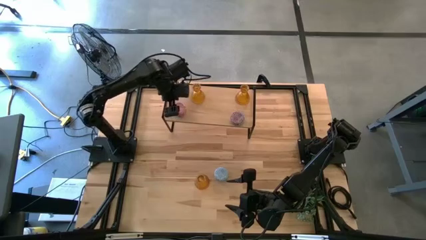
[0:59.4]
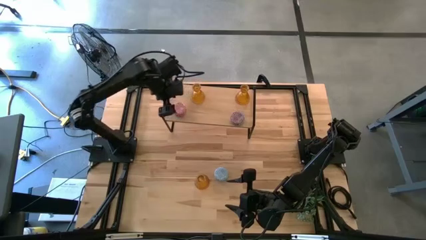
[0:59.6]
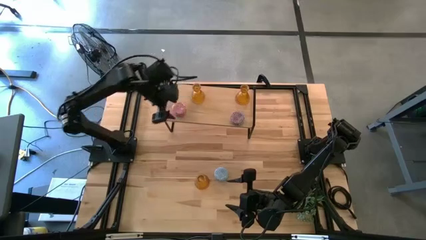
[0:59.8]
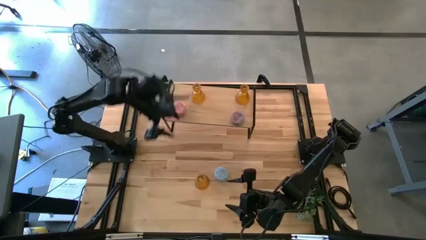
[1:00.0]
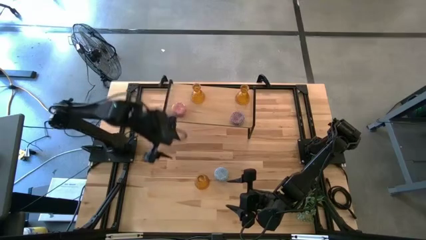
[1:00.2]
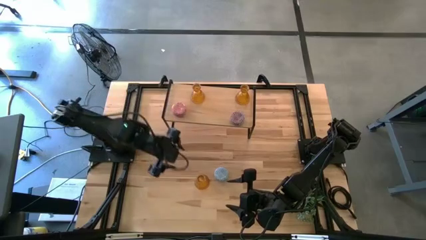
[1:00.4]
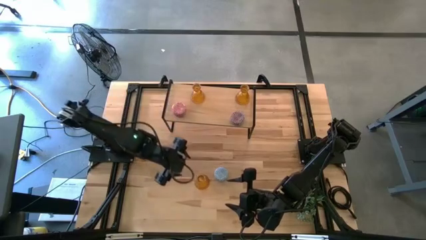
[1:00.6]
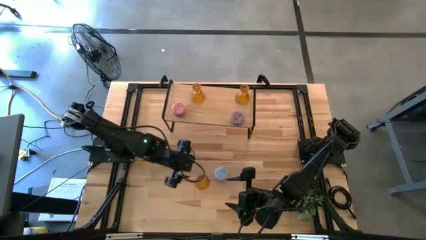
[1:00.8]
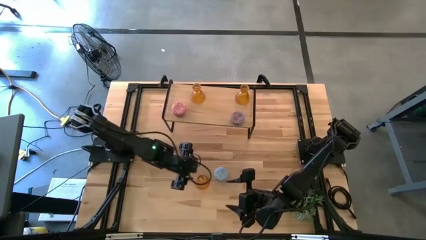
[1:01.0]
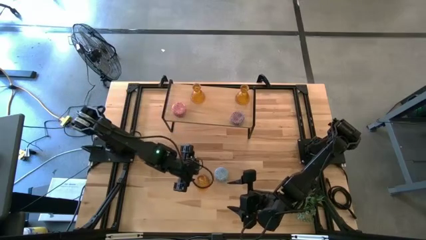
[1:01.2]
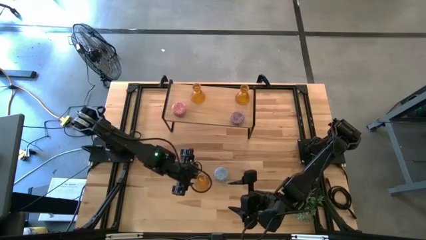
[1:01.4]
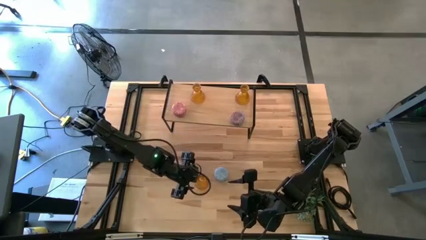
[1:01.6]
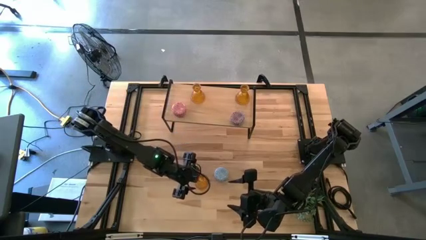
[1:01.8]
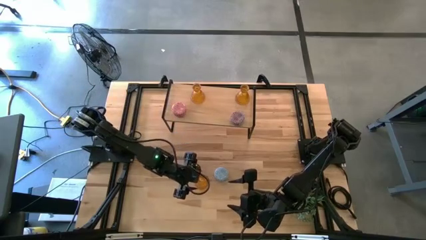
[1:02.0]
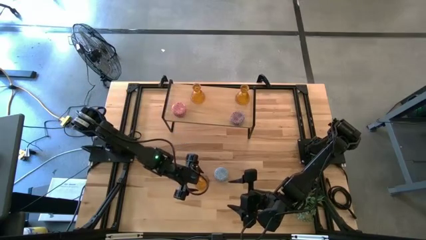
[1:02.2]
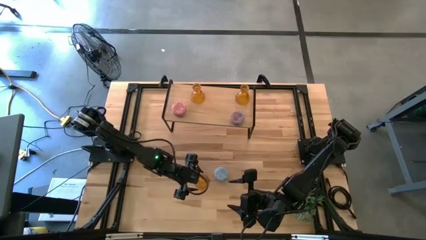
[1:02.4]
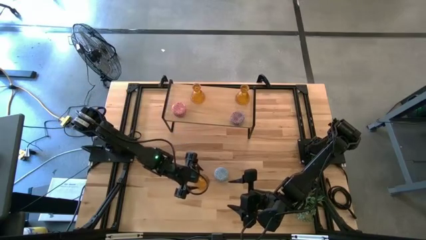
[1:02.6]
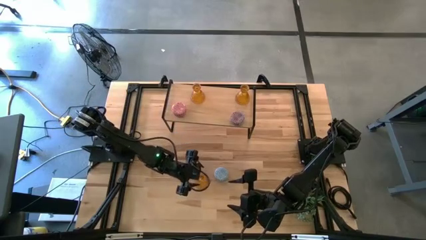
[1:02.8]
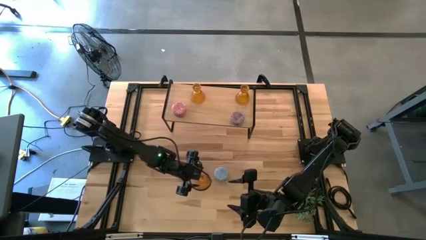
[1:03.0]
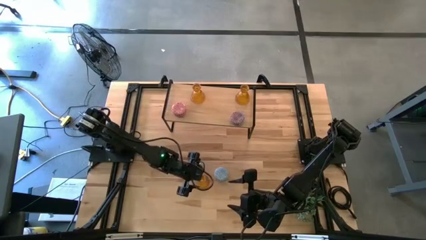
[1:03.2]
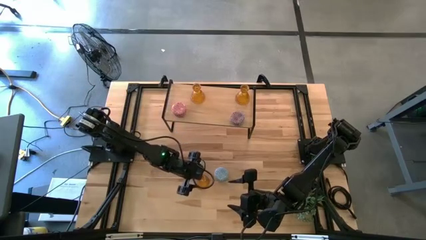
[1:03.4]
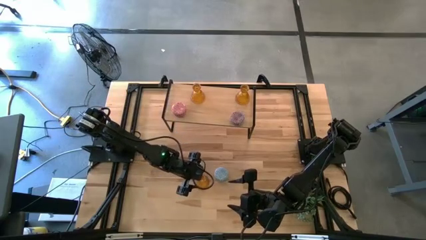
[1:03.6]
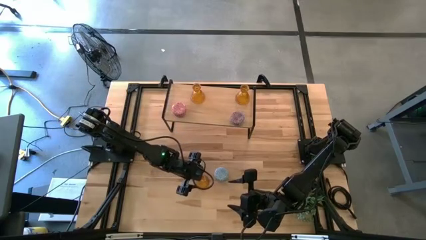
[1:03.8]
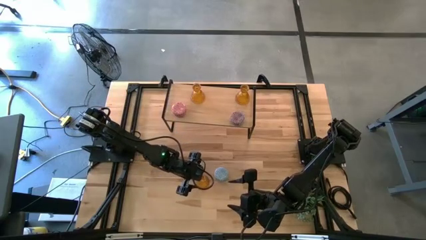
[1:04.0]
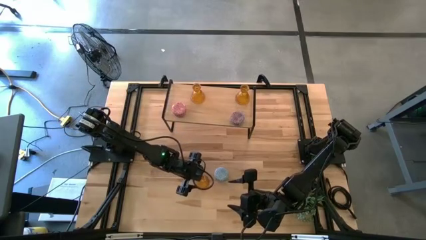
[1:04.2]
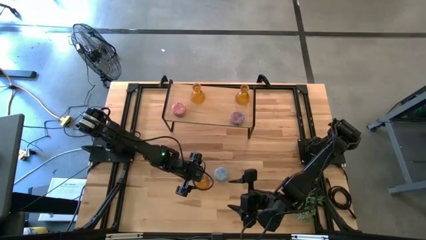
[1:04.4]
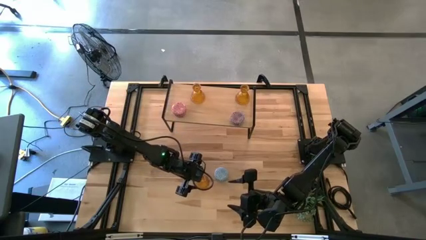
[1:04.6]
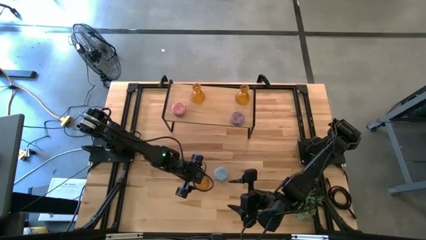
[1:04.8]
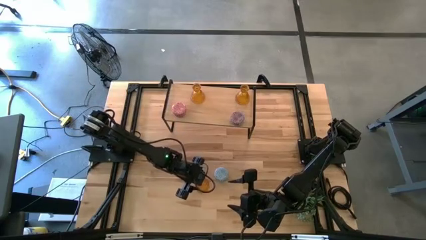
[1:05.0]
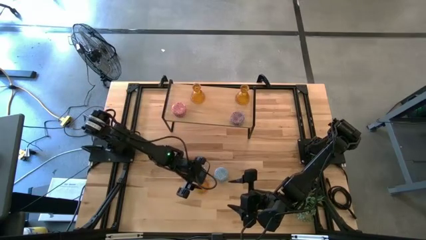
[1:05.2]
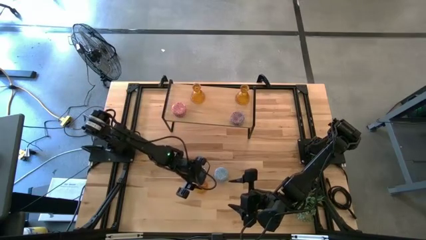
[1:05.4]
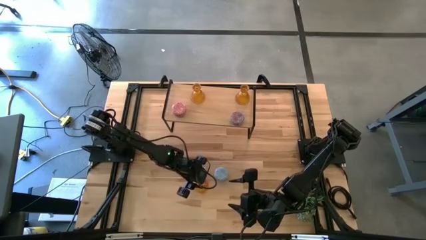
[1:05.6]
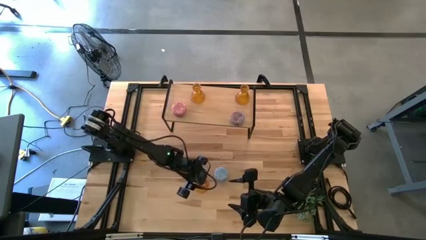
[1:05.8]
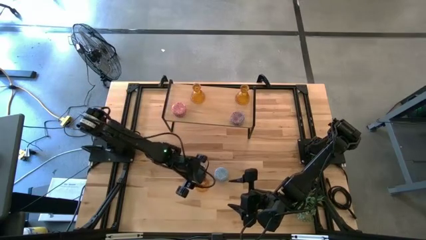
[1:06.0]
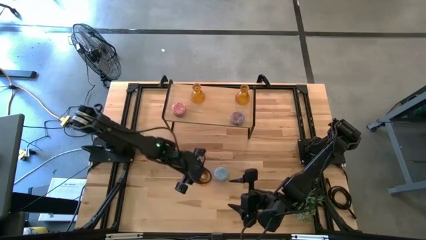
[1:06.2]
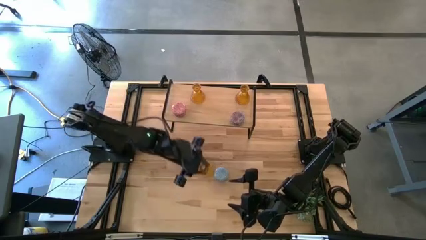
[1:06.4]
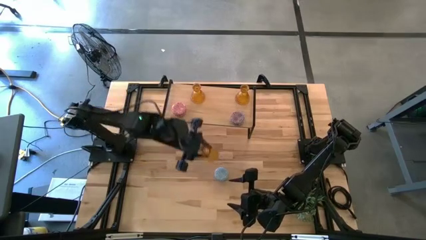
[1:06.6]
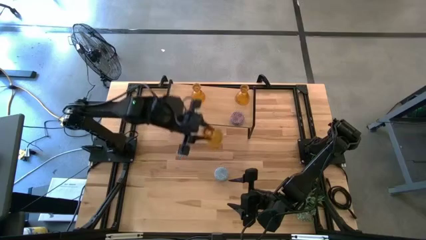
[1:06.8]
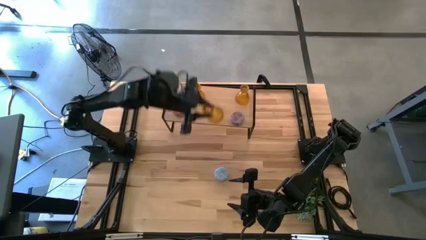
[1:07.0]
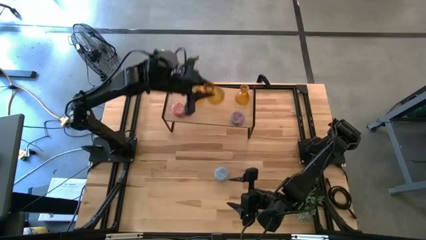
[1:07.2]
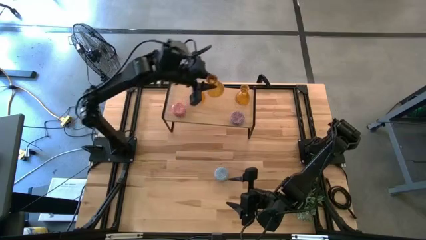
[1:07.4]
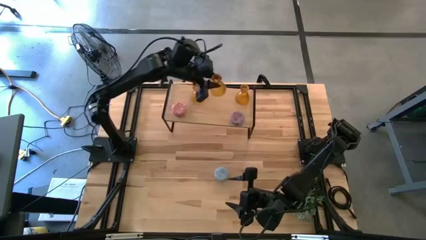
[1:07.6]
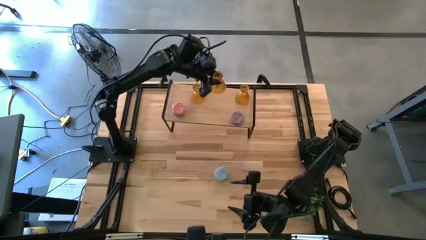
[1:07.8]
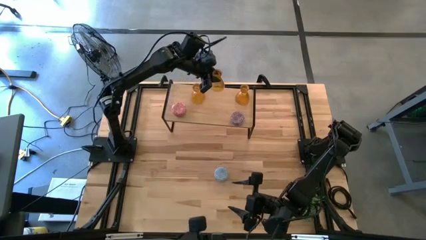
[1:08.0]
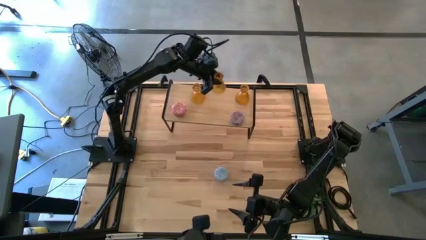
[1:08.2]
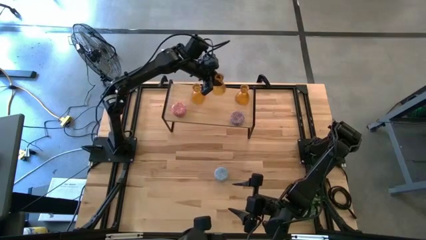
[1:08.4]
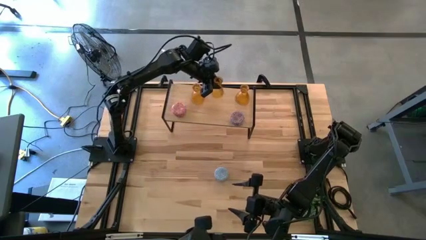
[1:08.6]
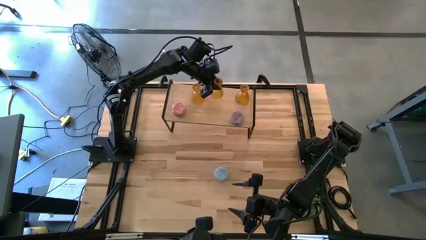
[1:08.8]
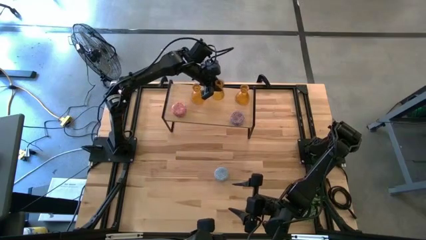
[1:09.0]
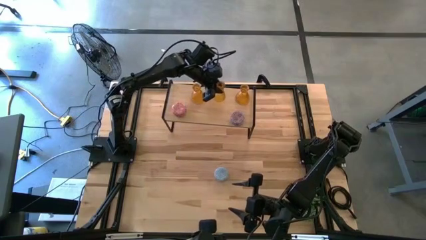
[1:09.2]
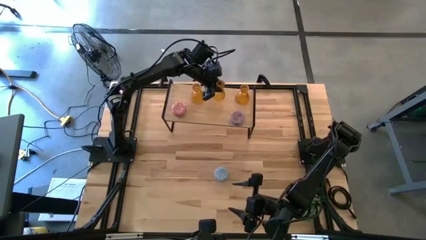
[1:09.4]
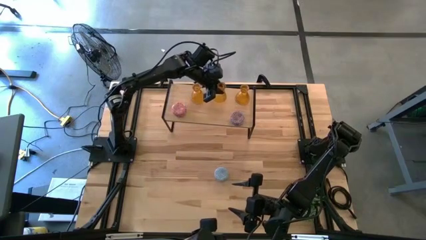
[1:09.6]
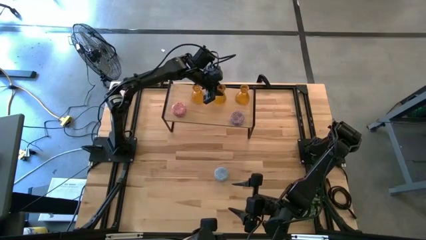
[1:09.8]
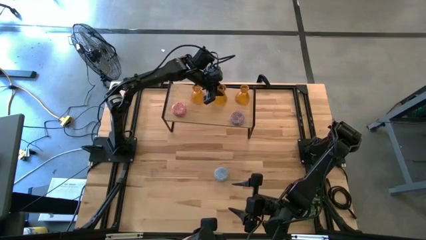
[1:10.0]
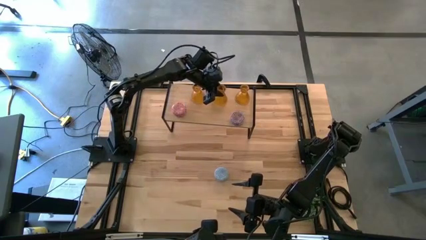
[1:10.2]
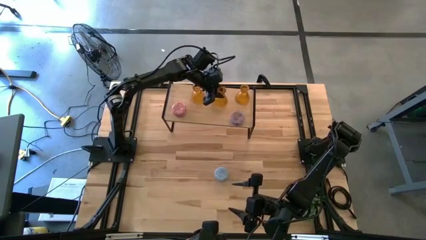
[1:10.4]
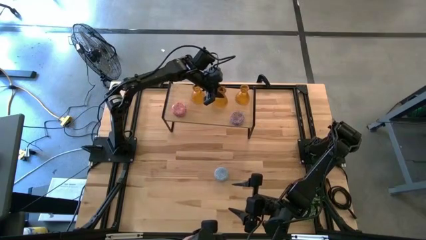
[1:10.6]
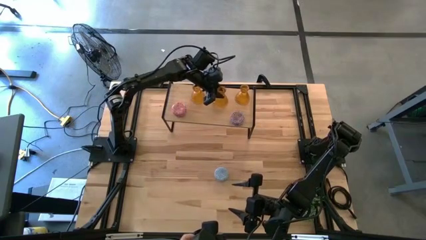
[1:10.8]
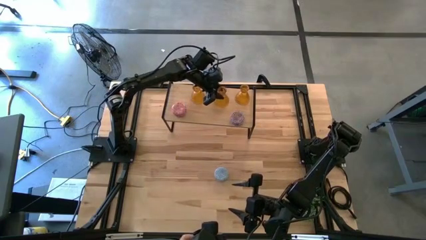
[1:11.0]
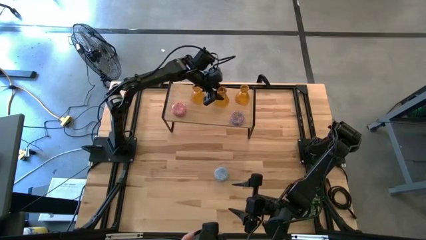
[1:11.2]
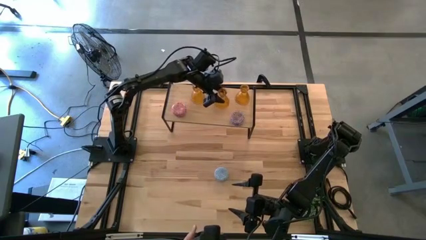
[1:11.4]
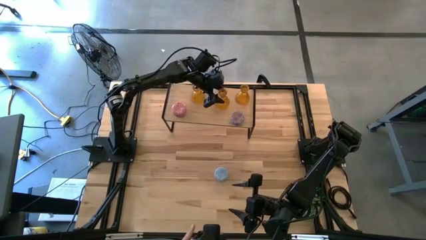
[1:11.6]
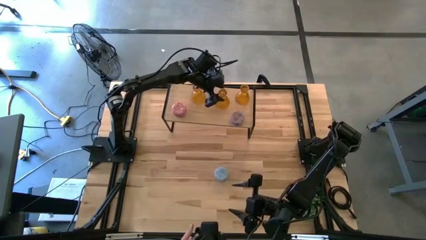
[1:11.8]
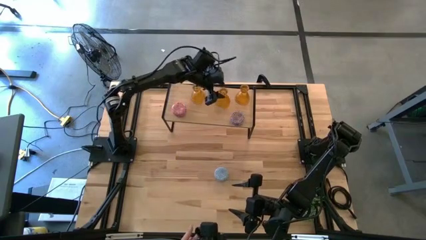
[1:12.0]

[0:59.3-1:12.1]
Task: Pick & Place candle stick holders
Put the yellow candle holder on the shelf aligned with the yellow candle holder
